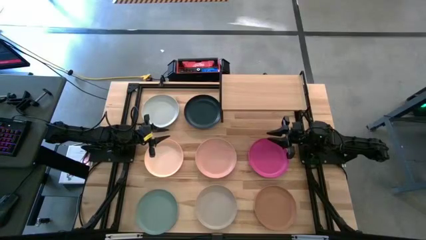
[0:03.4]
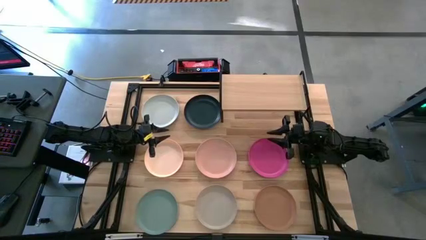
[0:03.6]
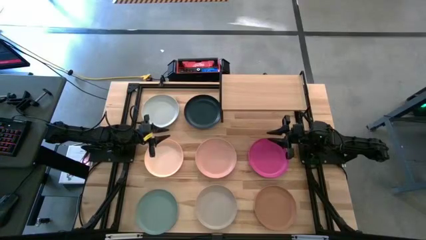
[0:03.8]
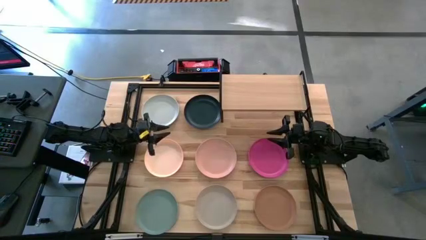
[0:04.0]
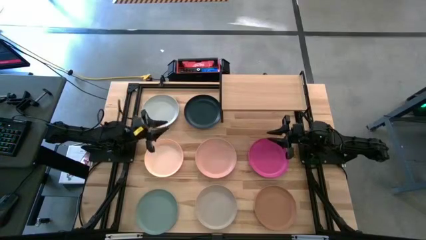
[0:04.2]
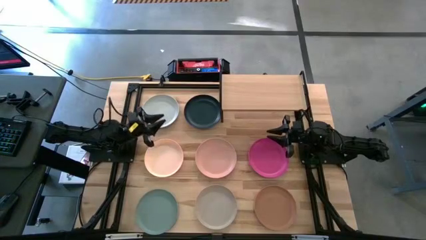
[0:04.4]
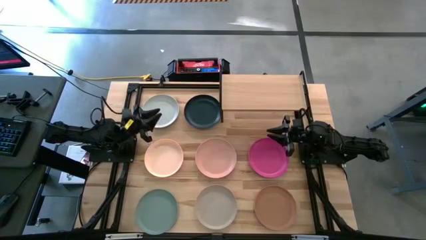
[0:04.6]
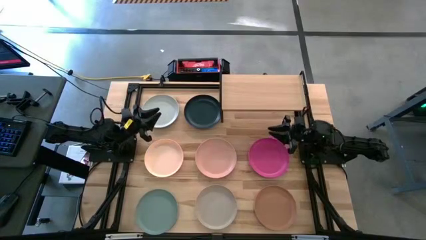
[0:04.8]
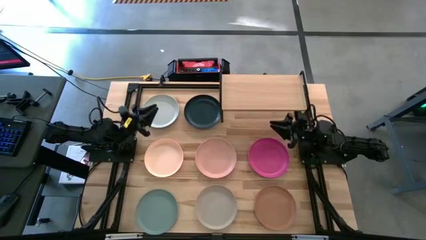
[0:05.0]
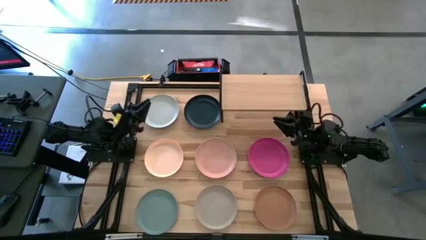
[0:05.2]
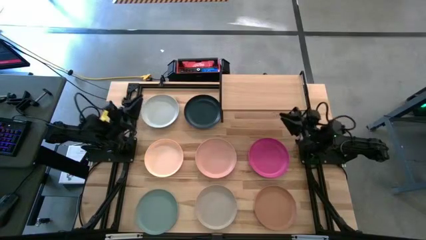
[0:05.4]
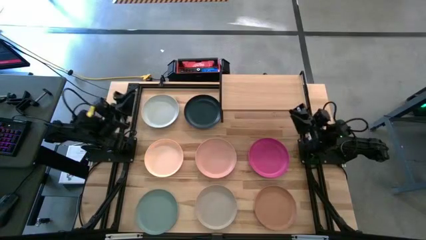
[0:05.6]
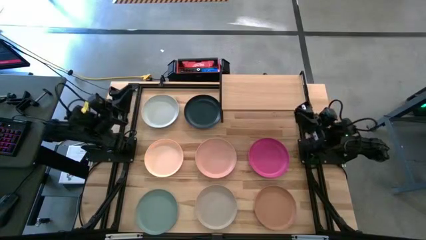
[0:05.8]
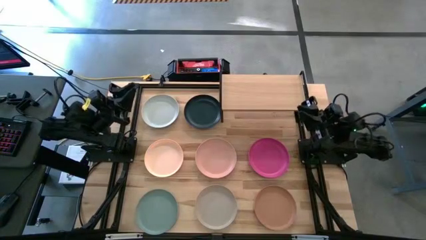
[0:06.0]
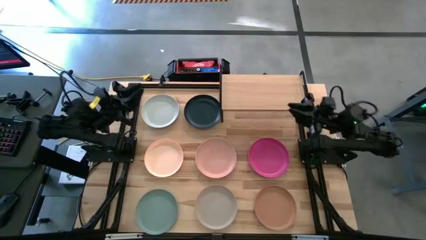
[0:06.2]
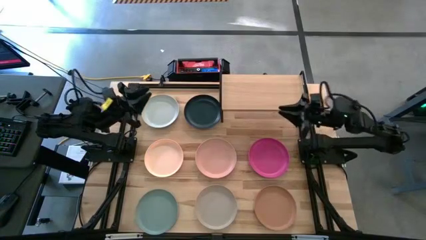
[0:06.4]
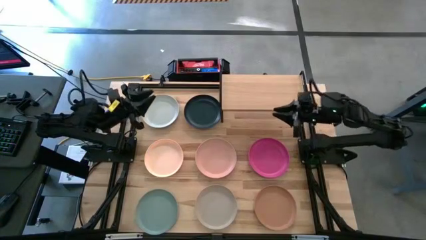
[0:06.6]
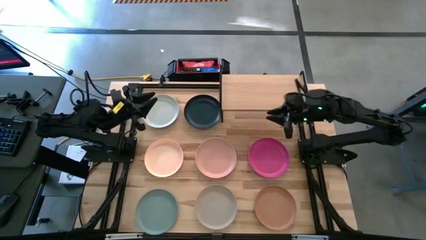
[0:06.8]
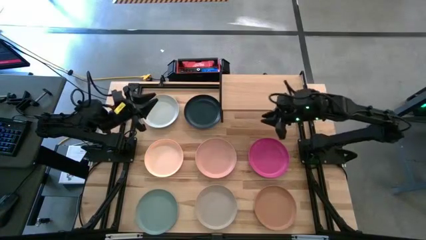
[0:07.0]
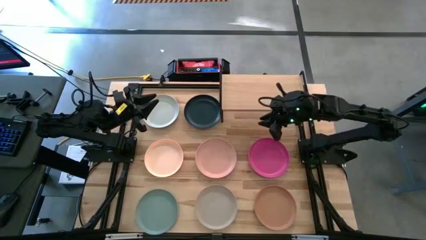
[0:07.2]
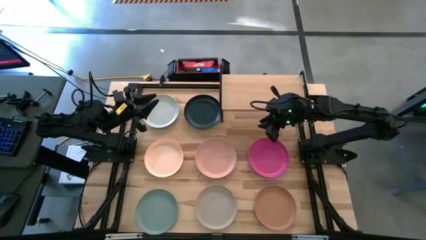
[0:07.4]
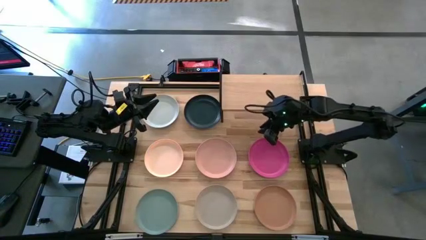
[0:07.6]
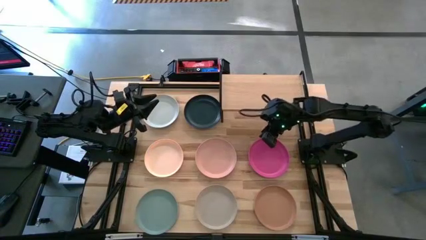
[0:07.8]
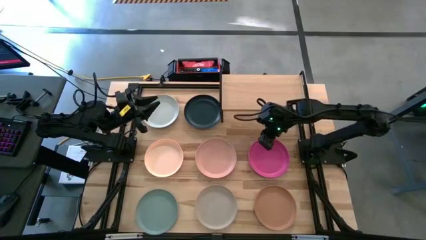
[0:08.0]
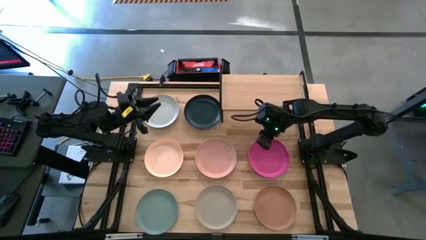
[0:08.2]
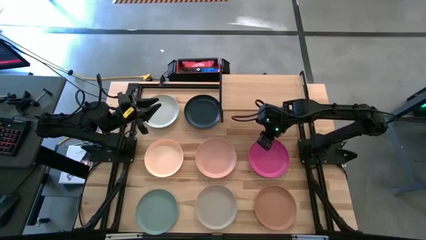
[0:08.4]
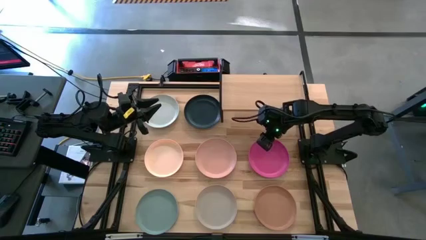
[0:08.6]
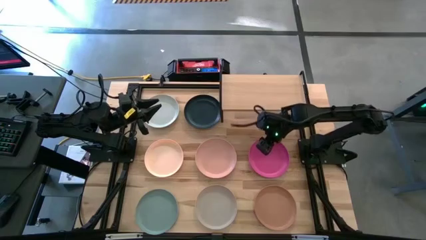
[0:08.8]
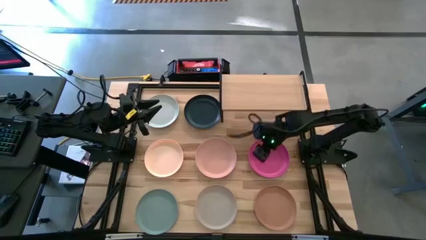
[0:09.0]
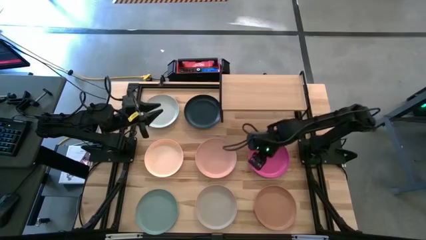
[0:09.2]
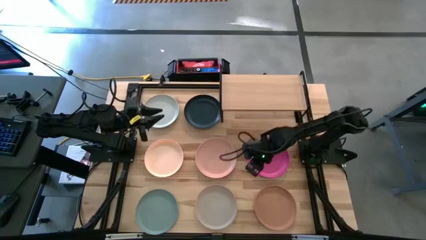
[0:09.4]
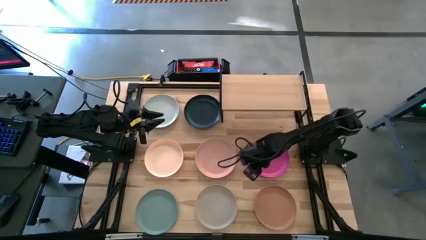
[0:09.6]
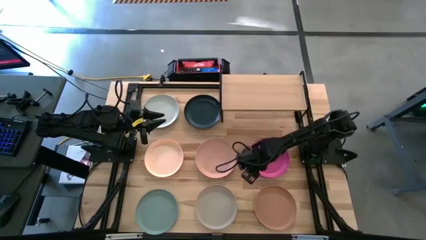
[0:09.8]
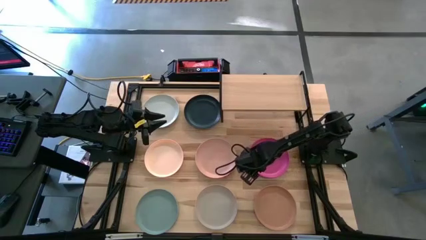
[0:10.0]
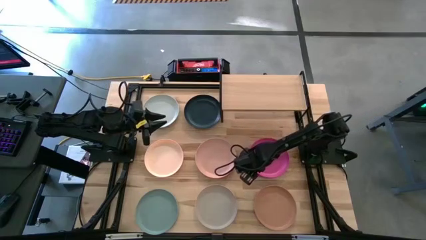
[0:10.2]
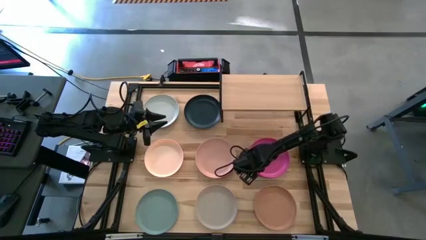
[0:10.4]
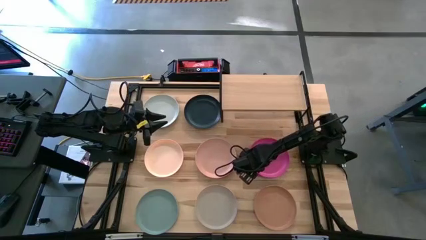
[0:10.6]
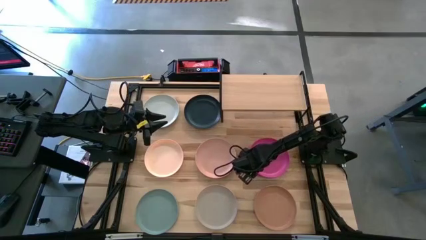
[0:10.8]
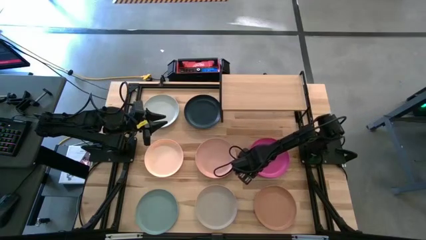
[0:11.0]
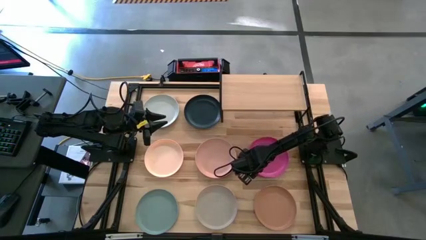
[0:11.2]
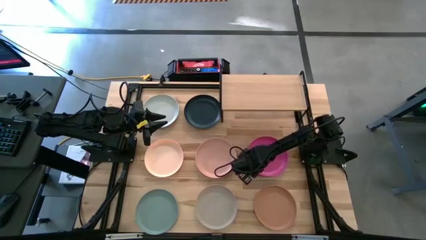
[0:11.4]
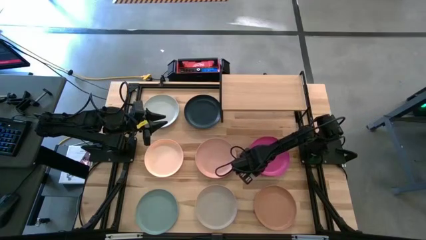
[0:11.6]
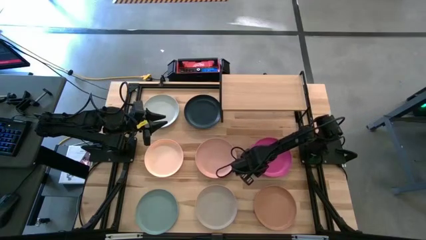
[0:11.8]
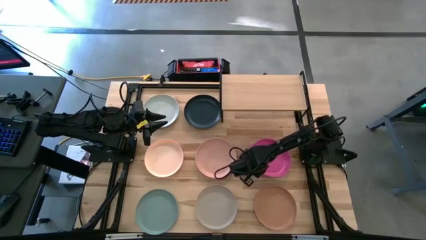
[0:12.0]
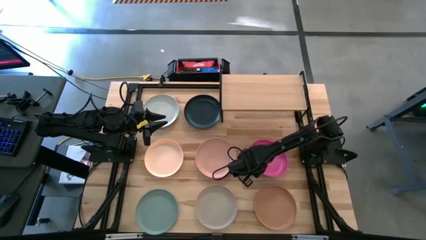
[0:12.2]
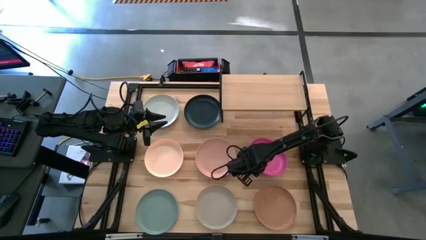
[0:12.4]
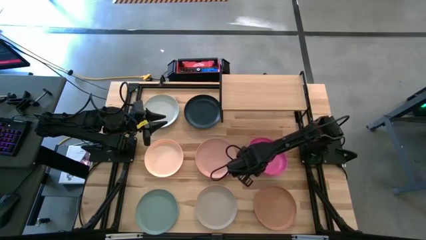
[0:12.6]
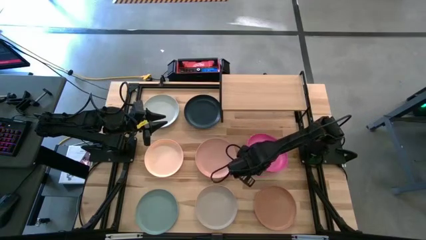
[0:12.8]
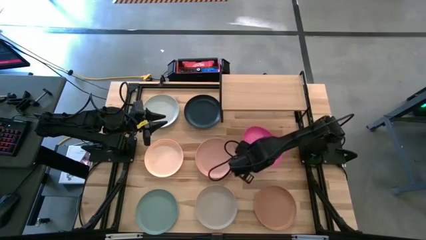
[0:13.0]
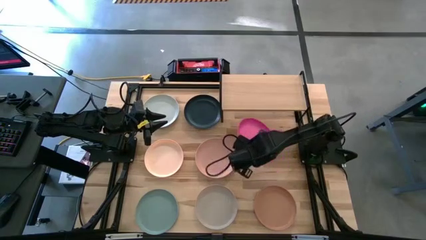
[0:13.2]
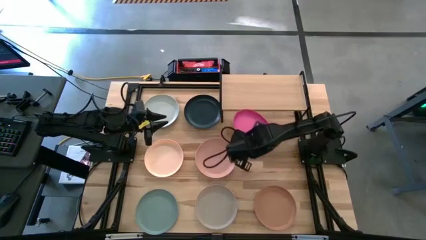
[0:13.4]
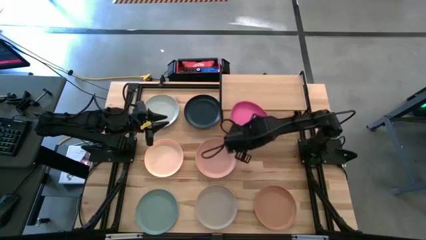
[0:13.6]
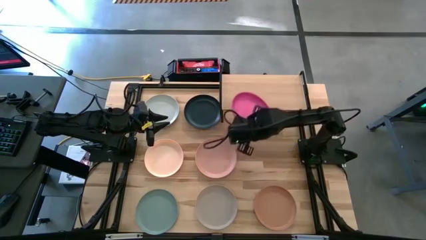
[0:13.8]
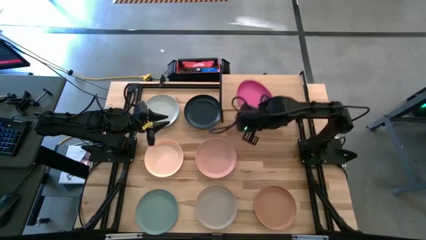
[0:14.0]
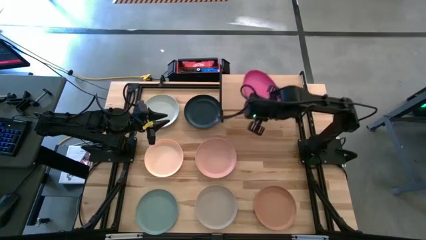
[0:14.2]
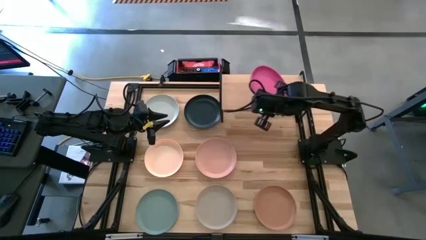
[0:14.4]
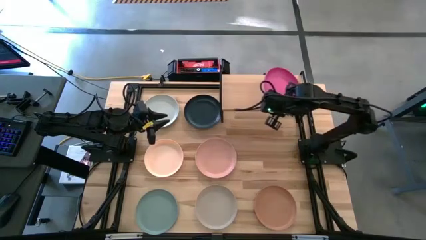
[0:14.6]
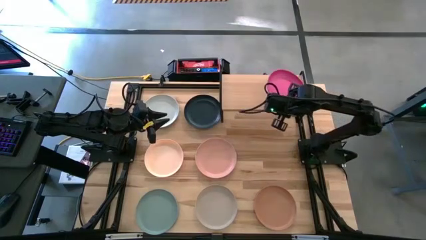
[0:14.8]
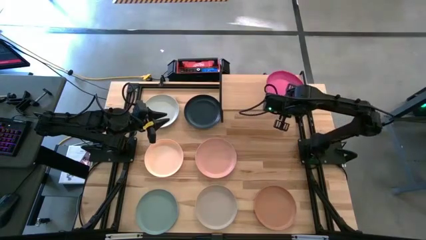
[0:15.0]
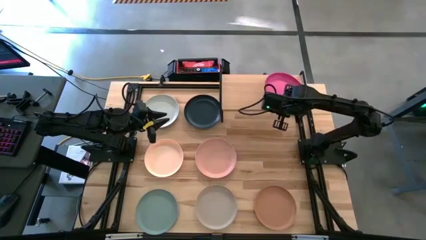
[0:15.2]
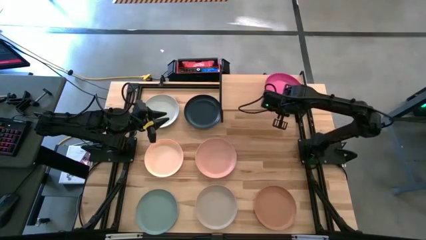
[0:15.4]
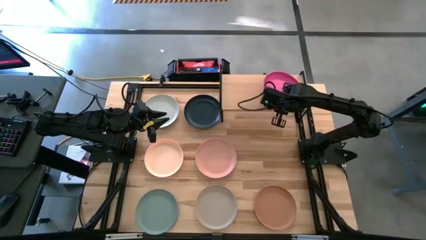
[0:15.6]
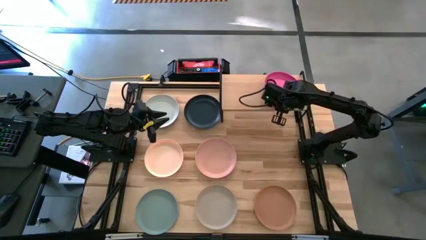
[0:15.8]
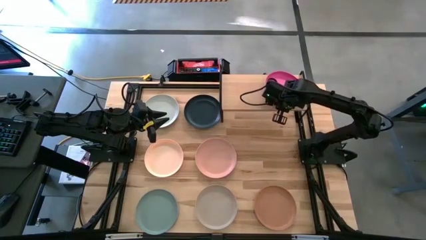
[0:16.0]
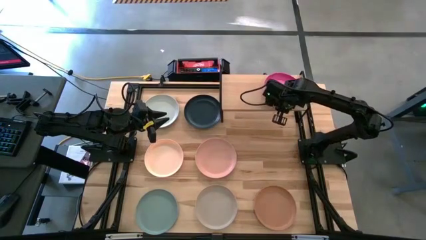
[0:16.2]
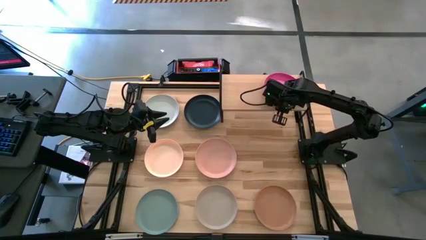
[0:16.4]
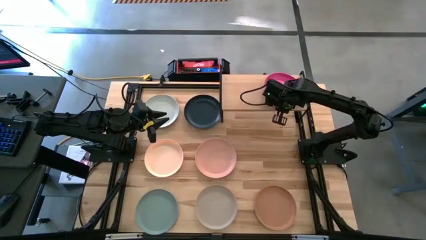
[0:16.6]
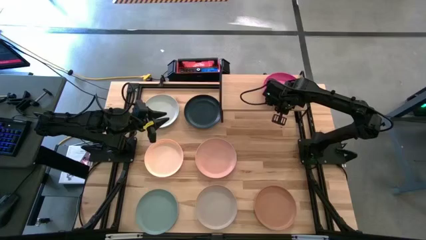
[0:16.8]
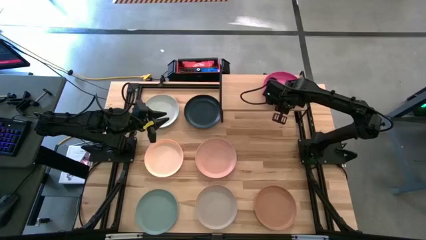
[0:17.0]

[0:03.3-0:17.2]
Task: Place and stack plates onto a shelf
Put the pink plate onto the shelf
